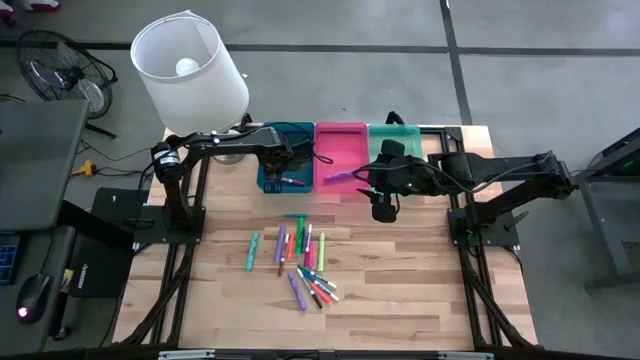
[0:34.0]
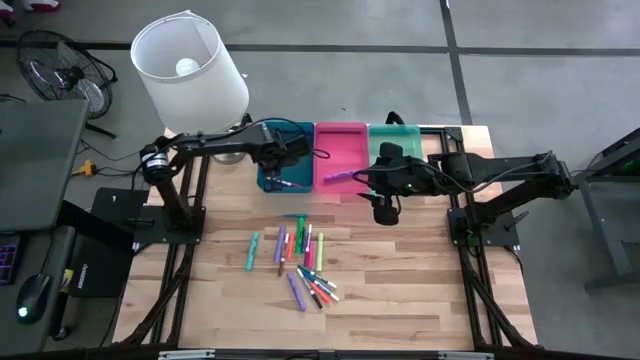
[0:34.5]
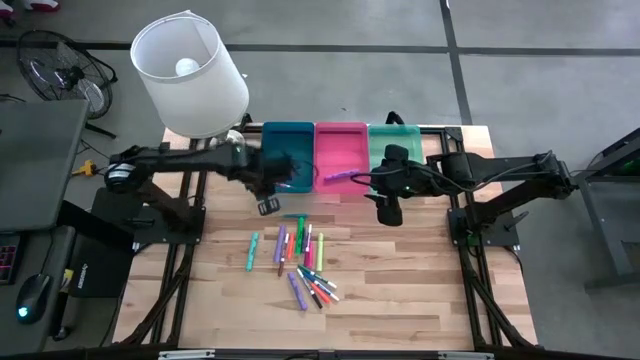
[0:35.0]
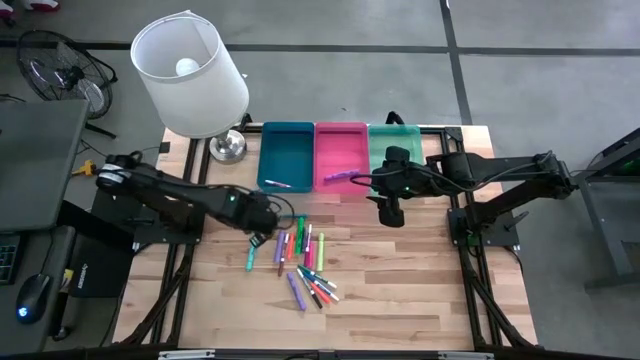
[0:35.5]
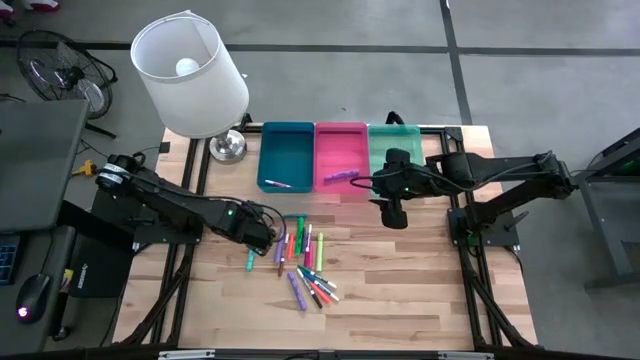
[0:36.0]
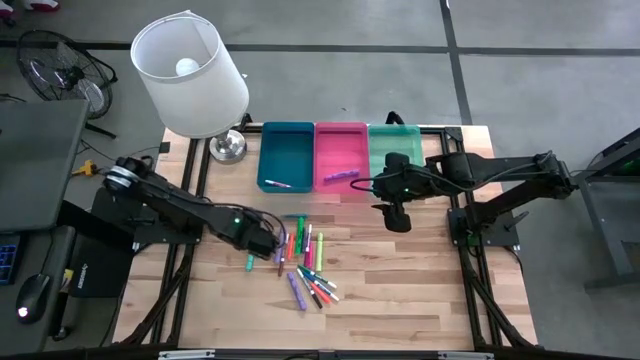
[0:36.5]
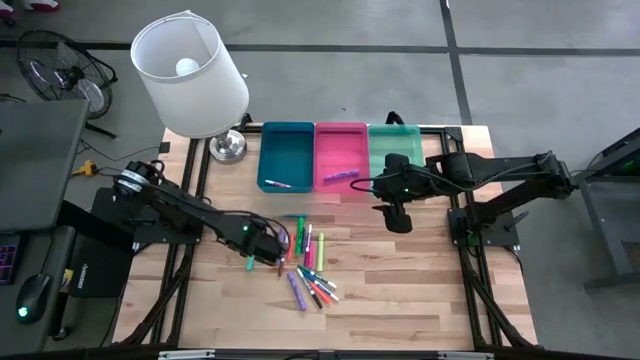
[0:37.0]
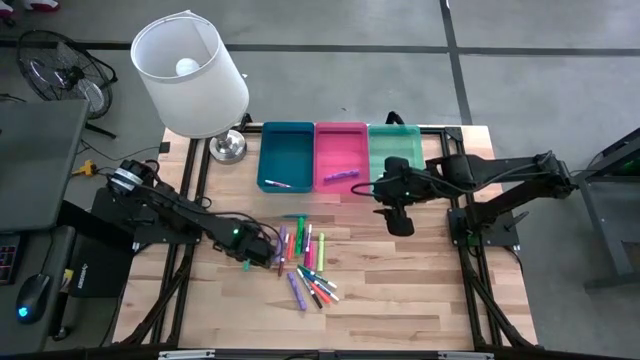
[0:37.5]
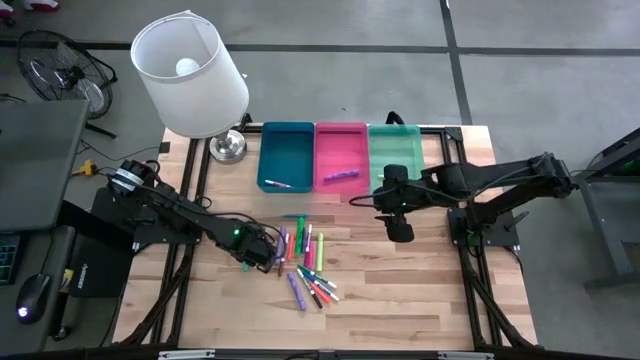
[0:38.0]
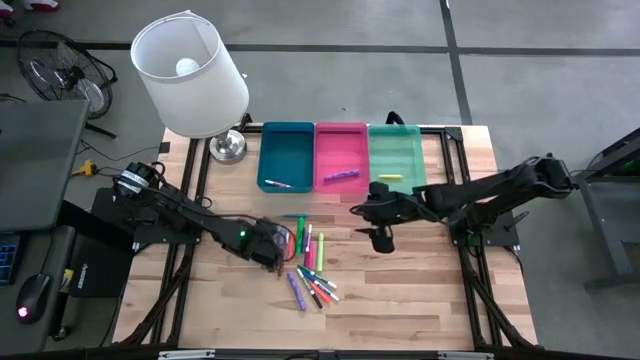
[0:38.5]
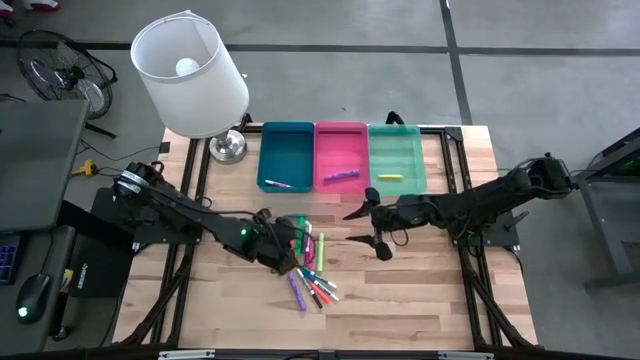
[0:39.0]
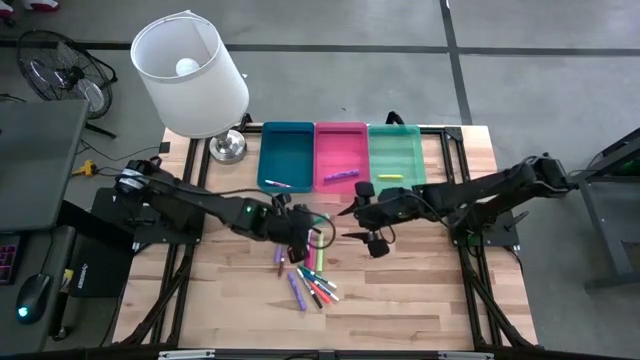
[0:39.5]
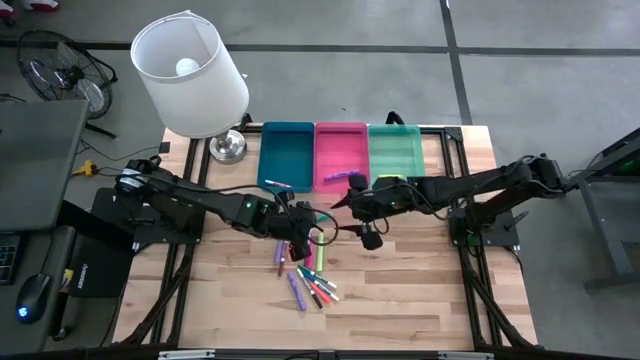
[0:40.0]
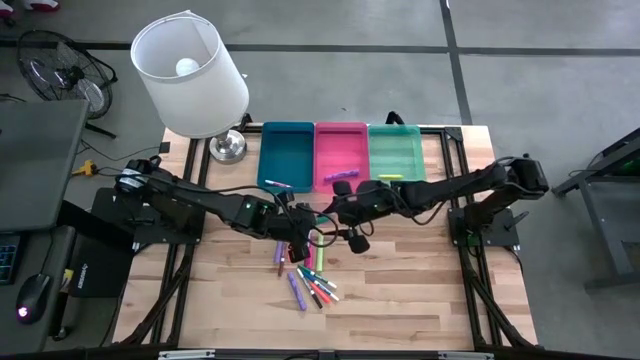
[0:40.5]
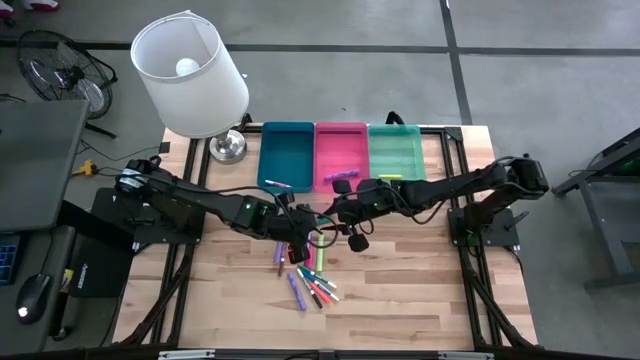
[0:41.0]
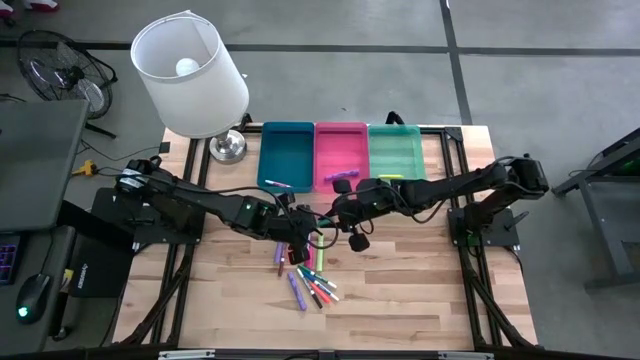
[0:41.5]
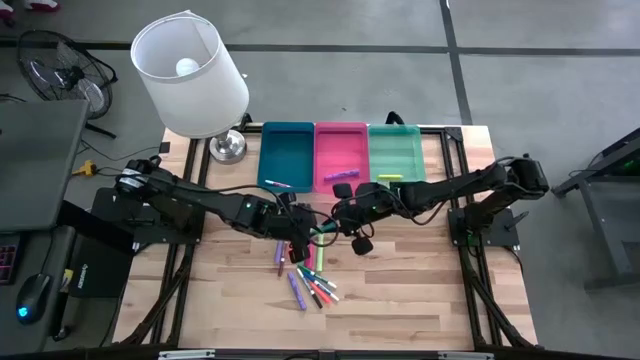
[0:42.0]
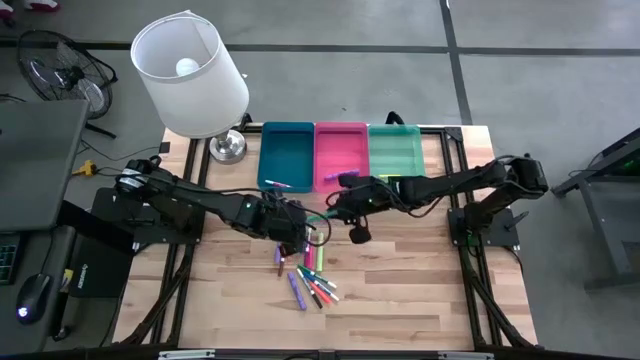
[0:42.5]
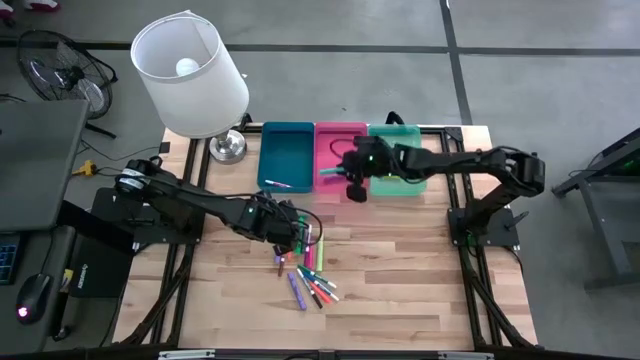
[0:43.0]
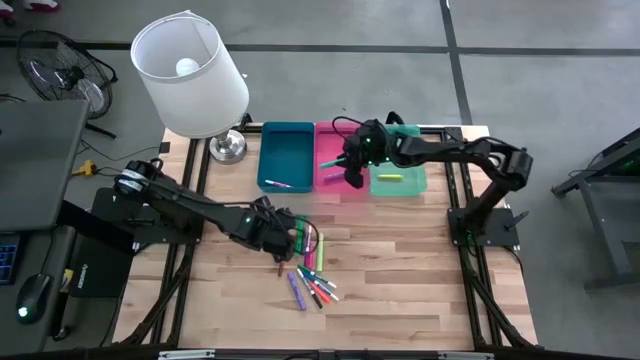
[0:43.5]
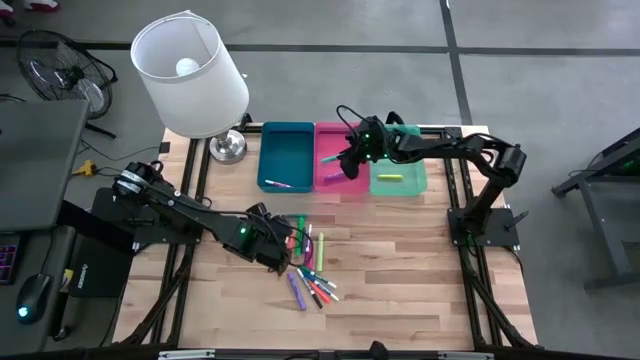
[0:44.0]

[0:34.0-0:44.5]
Task: Pick & Place Markers
Put the light blue highlighter into the pink bin

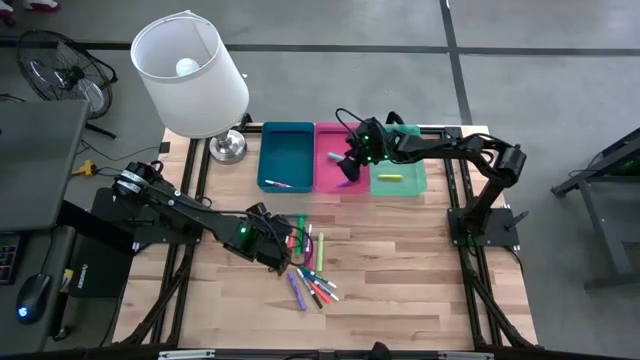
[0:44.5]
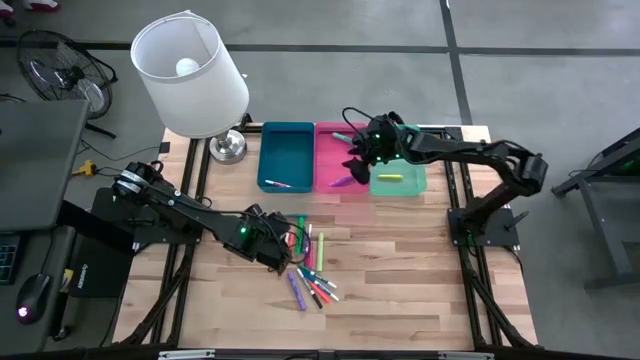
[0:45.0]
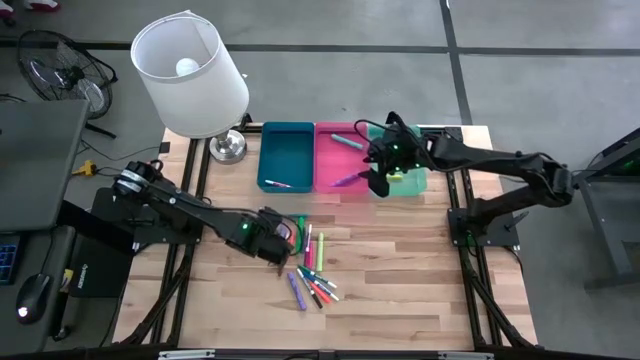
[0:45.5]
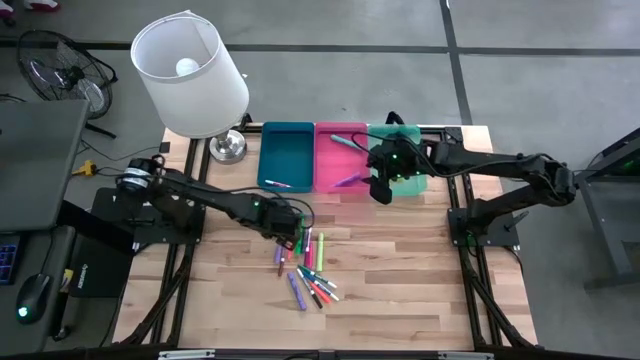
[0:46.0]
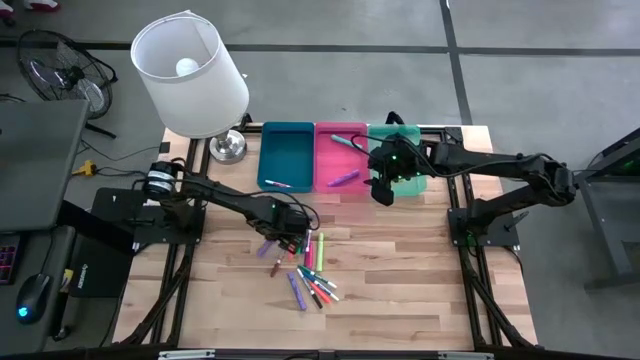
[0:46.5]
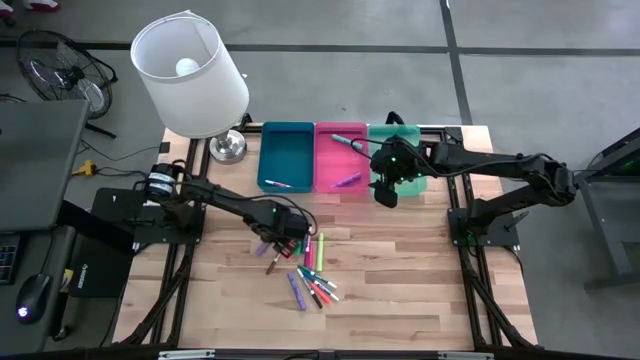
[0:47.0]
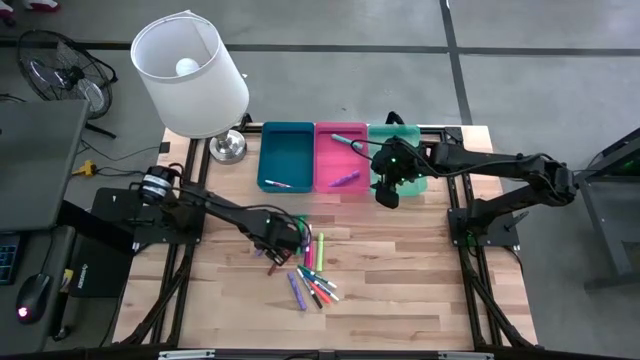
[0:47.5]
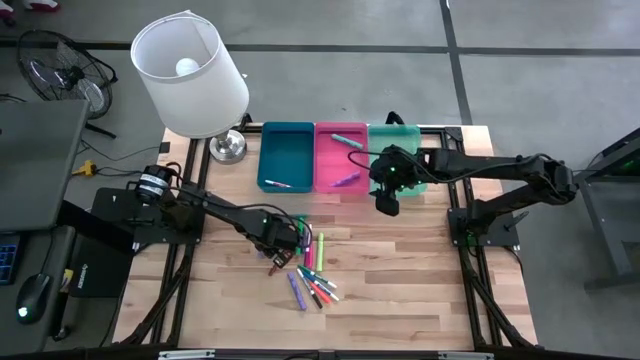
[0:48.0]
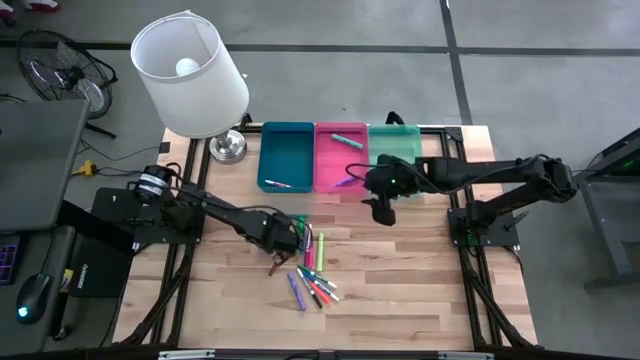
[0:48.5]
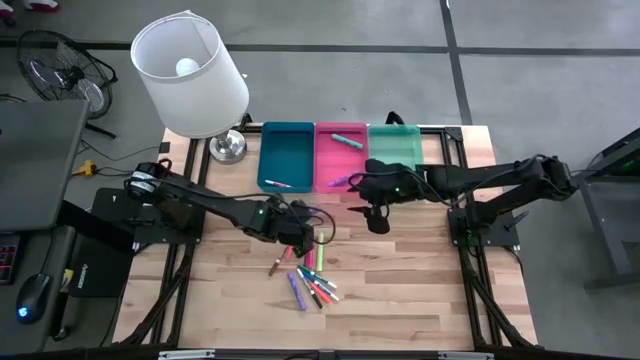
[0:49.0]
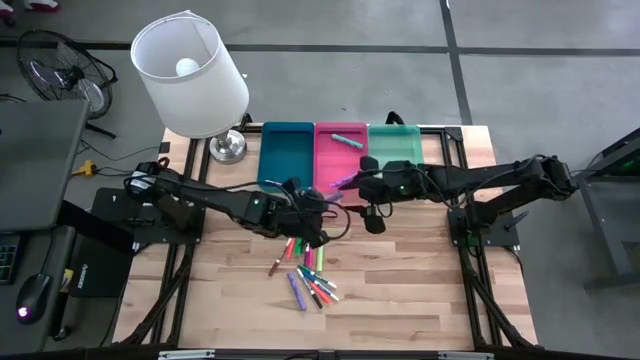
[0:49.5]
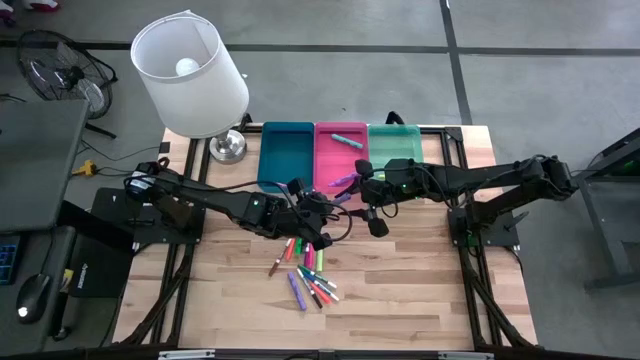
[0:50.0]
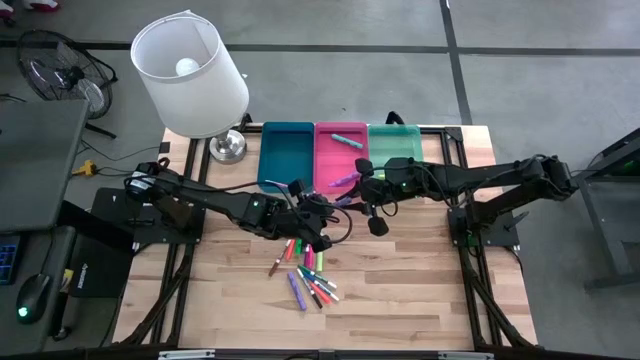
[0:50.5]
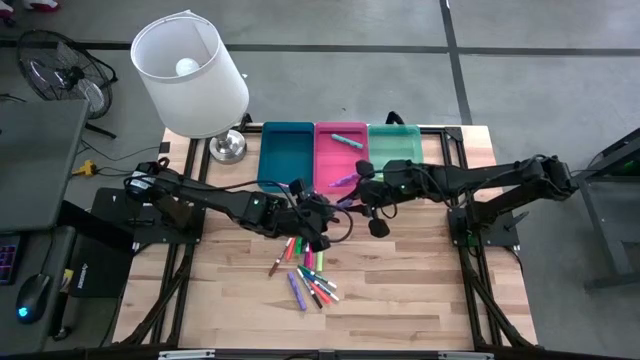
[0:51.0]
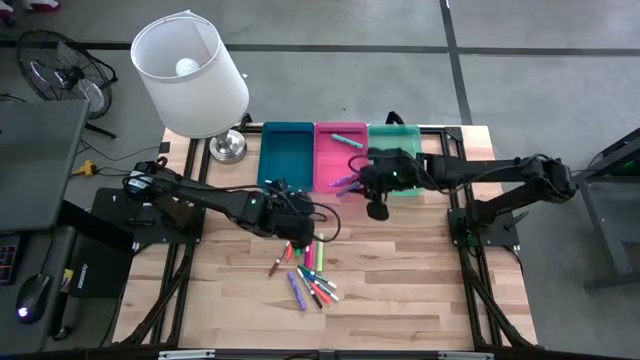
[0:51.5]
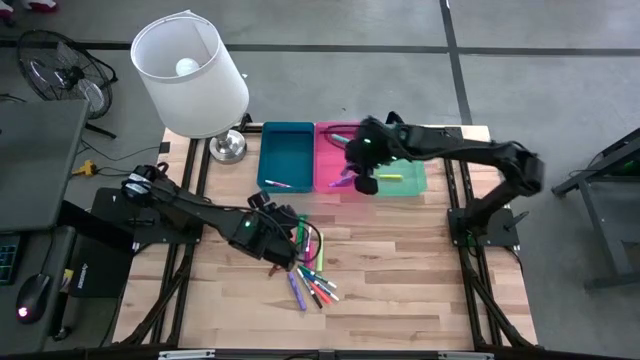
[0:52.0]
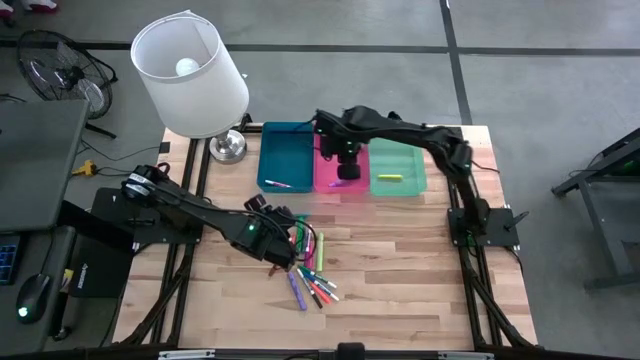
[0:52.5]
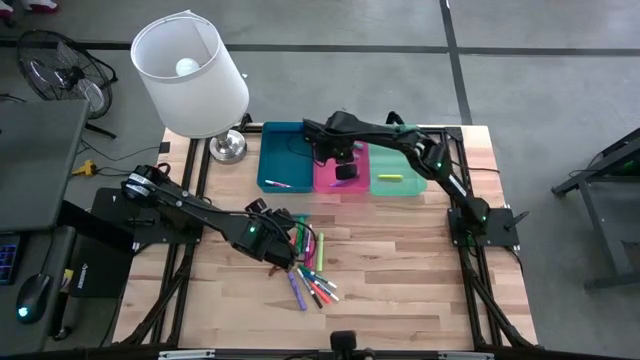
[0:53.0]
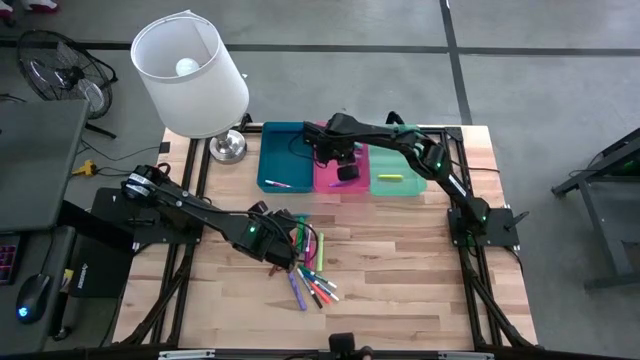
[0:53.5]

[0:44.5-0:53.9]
Put the top violet highlighter into the pink bin
